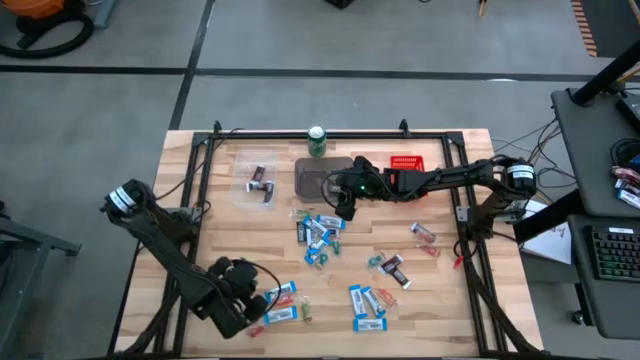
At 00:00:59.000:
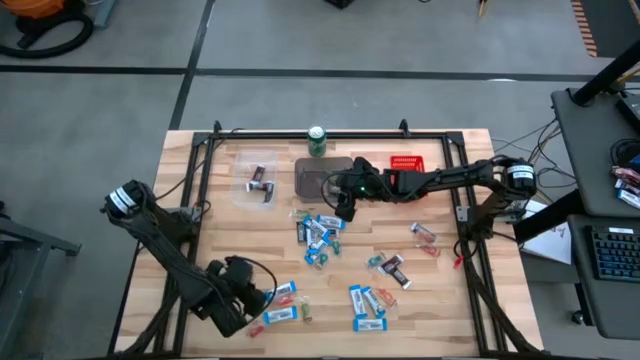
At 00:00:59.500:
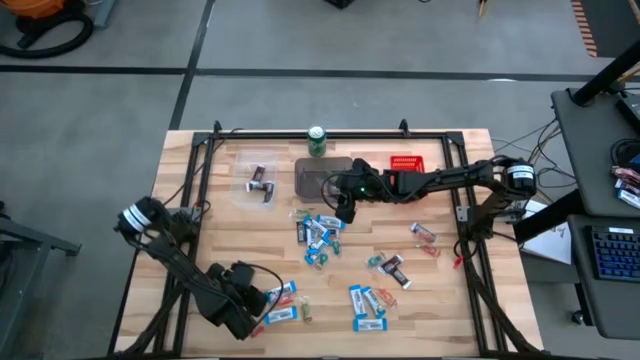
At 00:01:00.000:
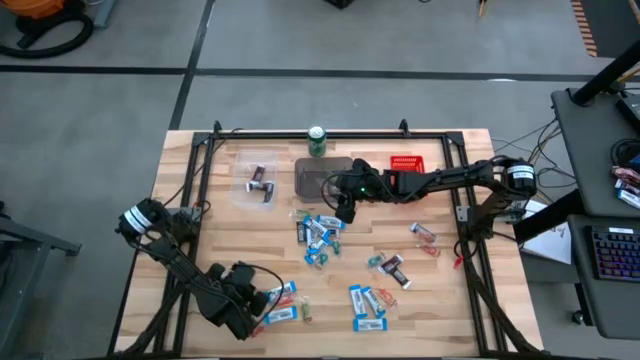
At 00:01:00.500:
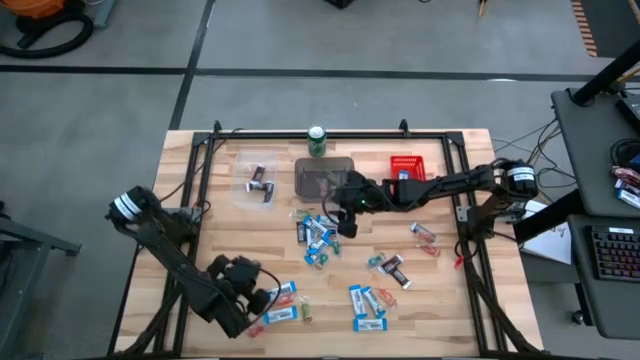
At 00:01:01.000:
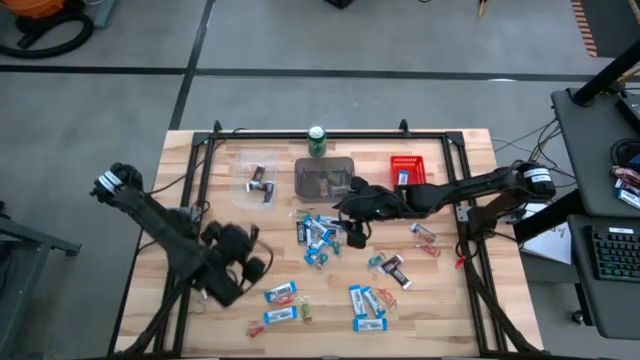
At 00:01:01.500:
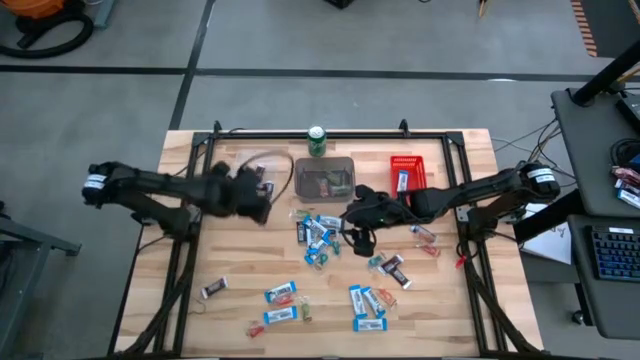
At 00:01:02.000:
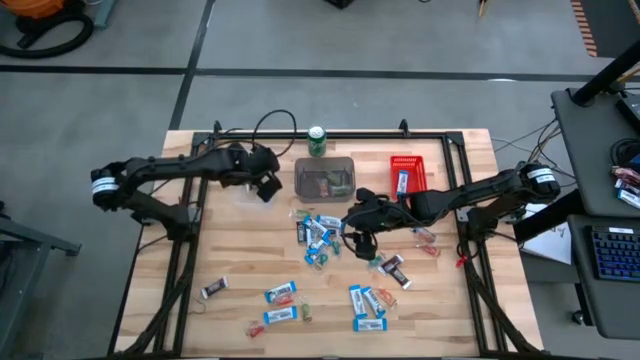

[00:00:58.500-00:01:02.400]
Task: Organize candy in baskets
Put the brown chocolate bar into the transparent bin

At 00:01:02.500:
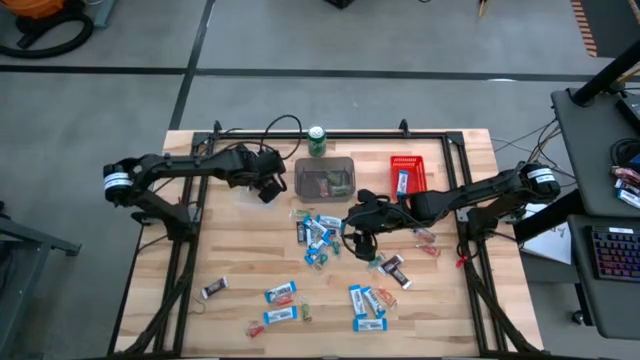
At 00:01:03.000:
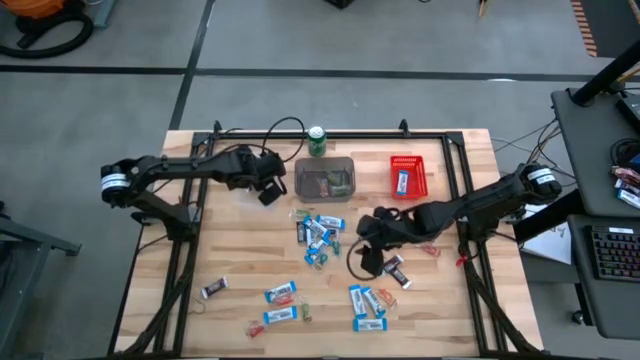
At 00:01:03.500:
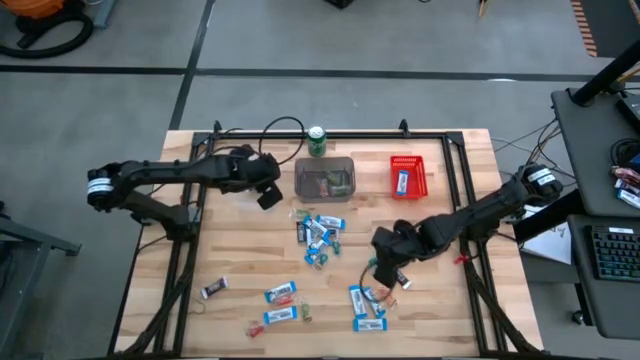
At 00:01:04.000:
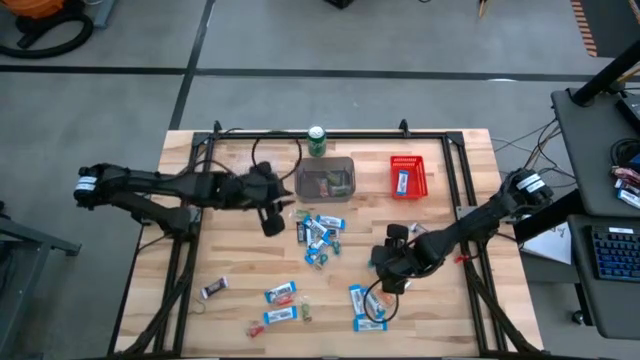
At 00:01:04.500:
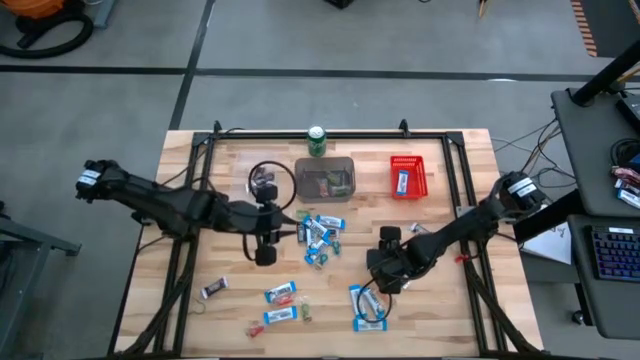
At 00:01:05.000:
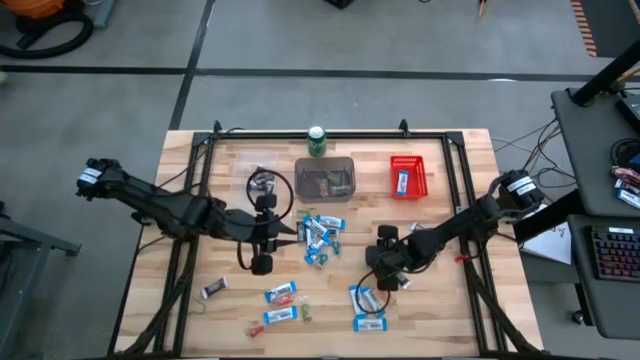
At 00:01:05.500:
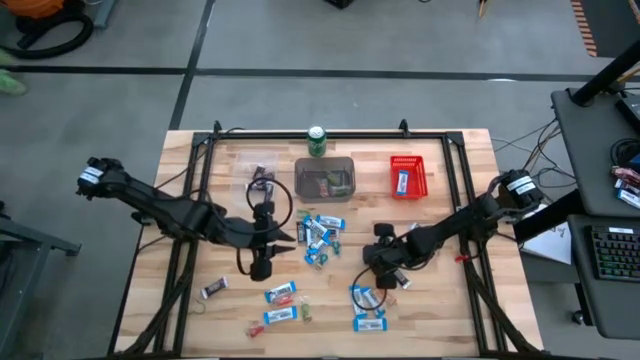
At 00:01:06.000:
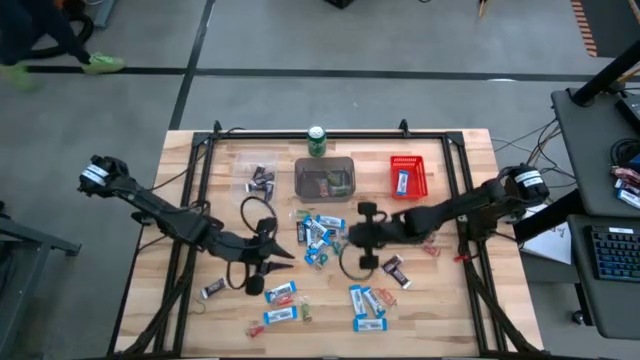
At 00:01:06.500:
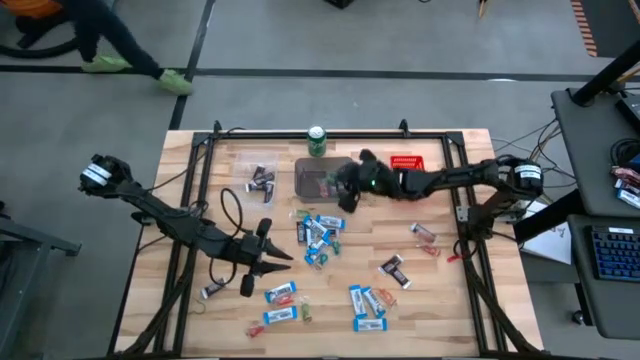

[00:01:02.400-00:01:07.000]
Put the dark blue gummy into the black bin

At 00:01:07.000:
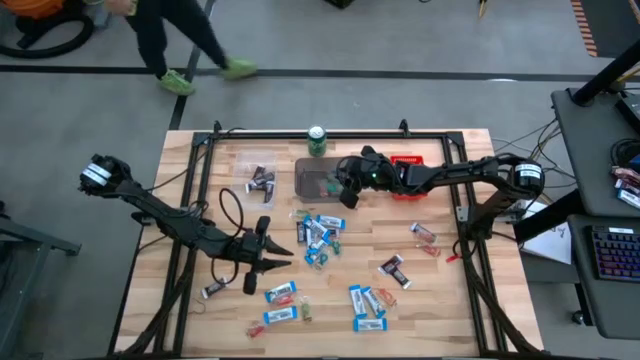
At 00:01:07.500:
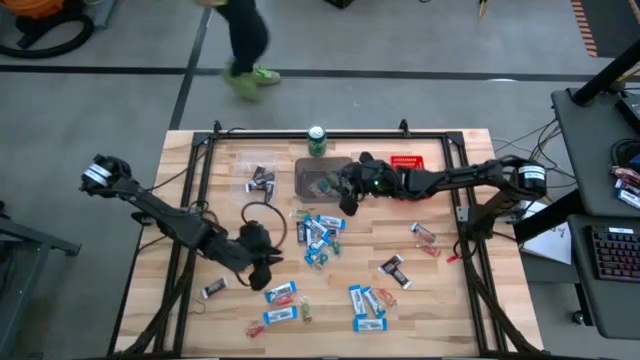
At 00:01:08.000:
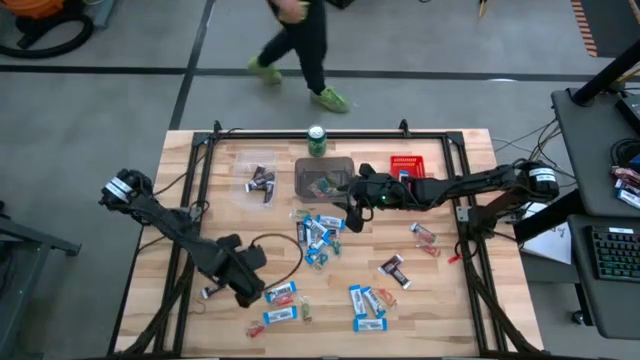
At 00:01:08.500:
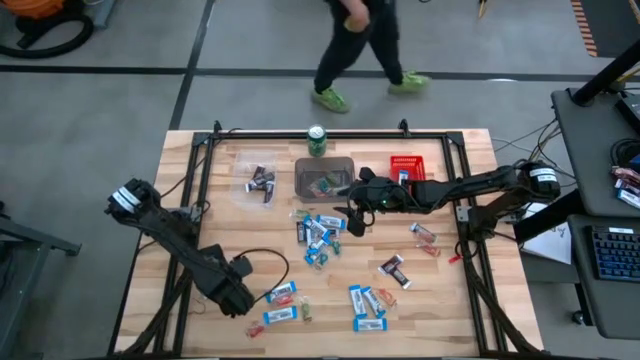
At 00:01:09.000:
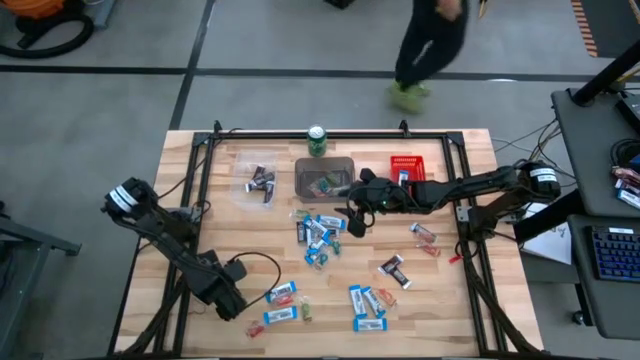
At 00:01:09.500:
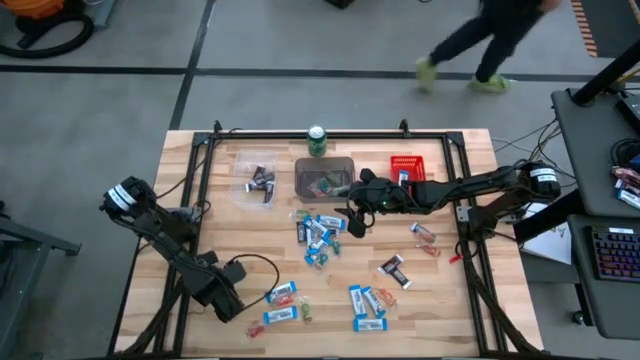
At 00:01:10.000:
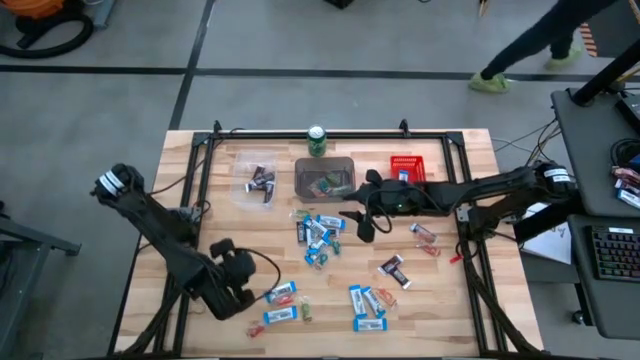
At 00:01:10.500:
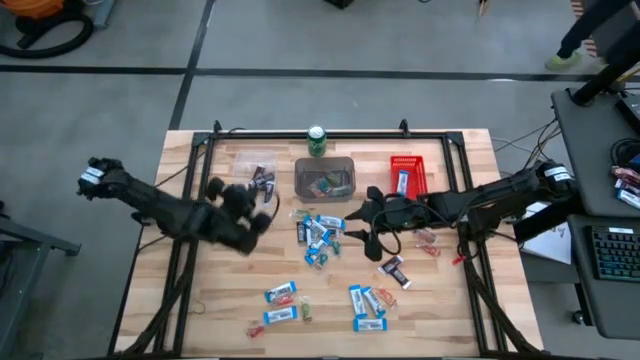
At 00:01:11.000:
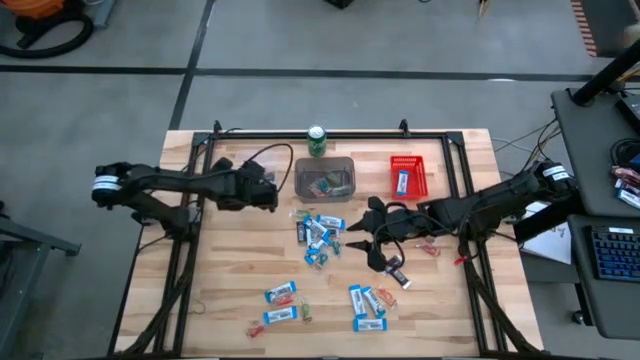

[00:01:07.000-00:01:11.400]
Put the brown chocolate bar into the transparent bin

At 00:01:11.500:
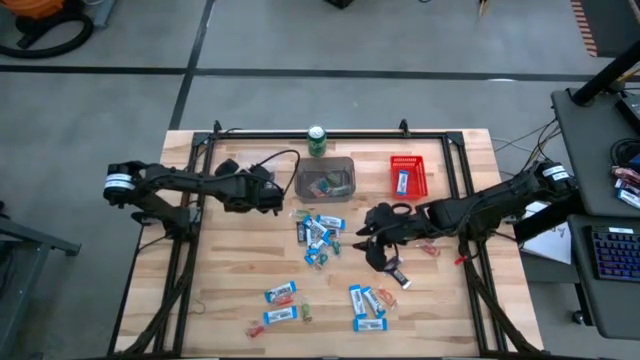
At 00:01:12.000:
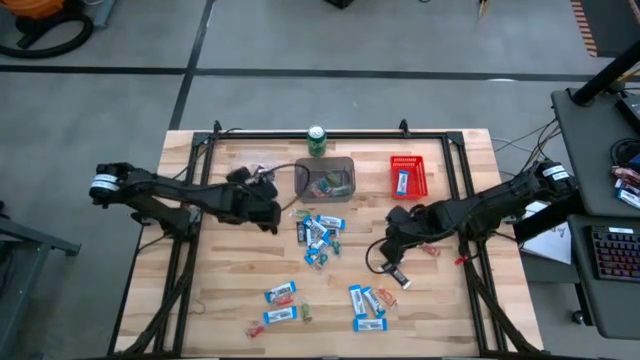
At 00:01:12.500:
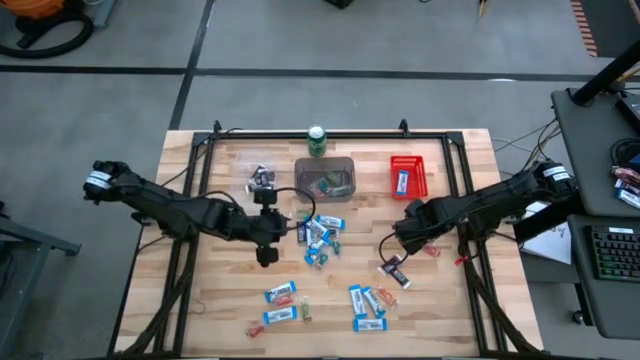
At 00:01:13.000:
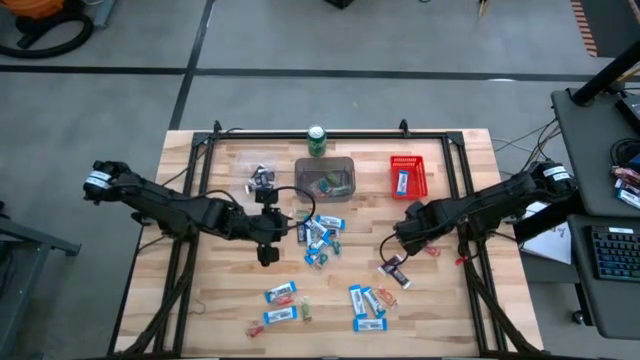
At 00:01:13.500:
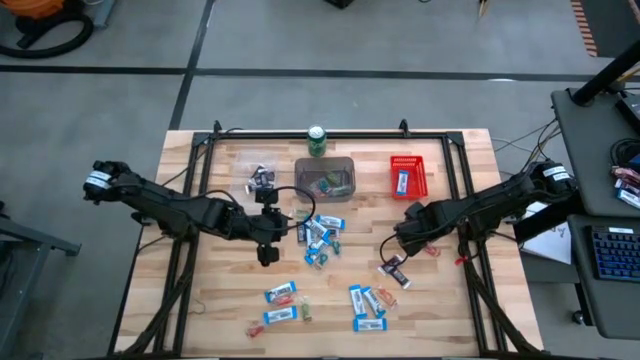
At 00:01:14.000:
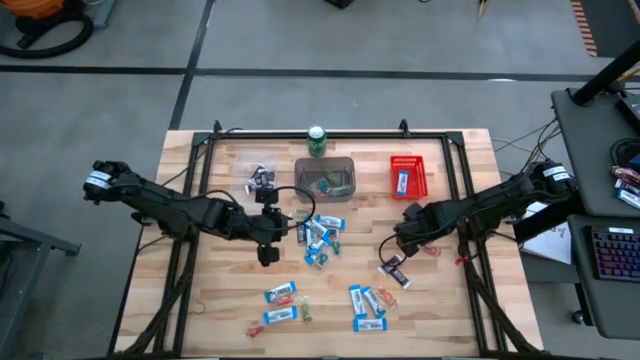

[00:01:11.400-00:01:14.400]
Put the orange gummy into the black bin

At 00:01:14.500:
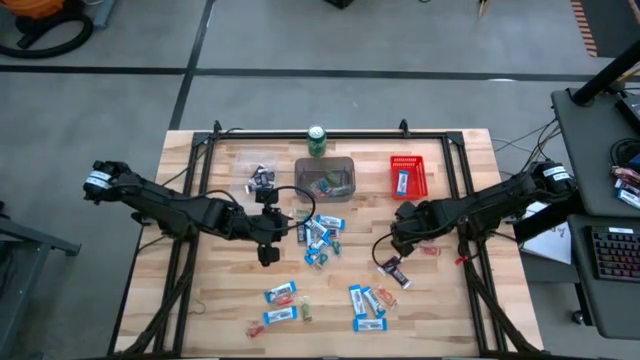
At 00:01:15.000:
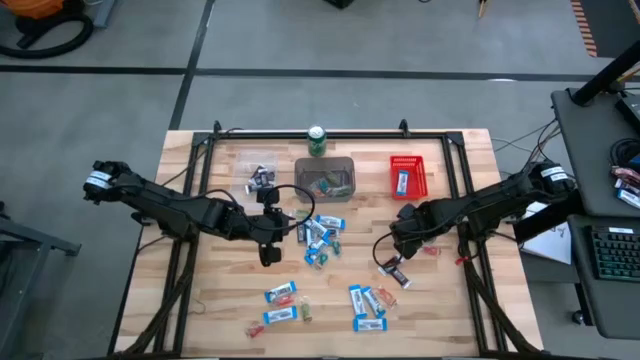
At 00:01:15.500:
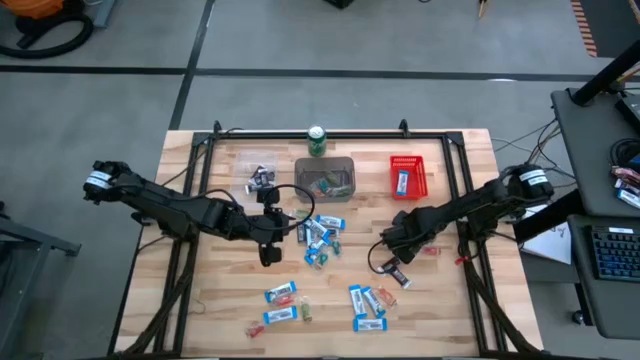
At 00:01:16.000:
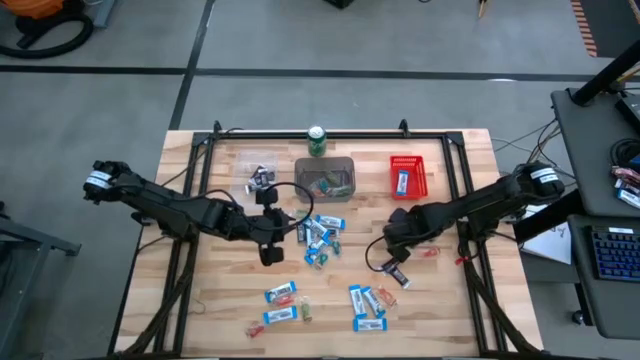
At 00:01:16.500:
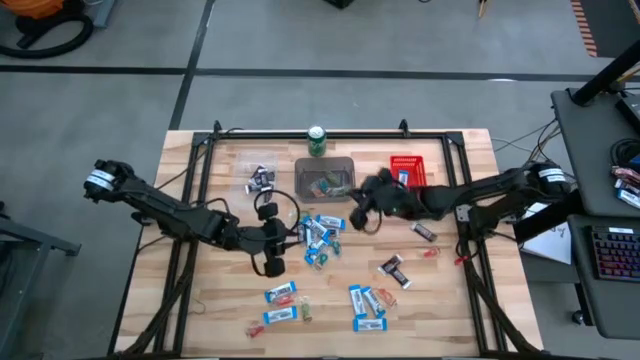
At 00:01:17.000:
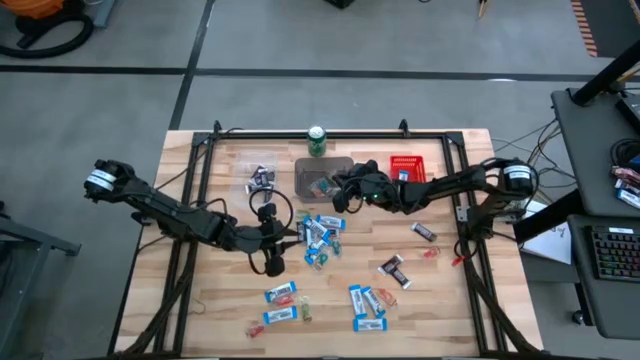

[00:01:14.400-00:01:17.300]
Put the orange gummy into the black bin

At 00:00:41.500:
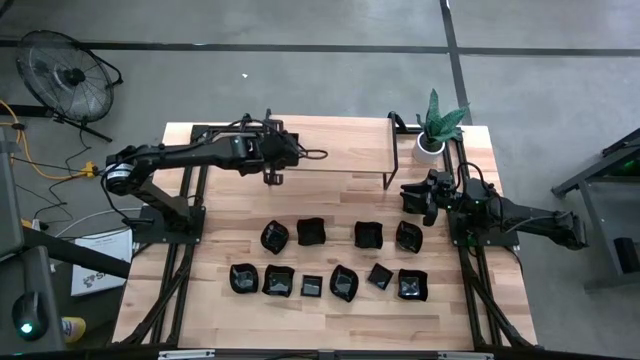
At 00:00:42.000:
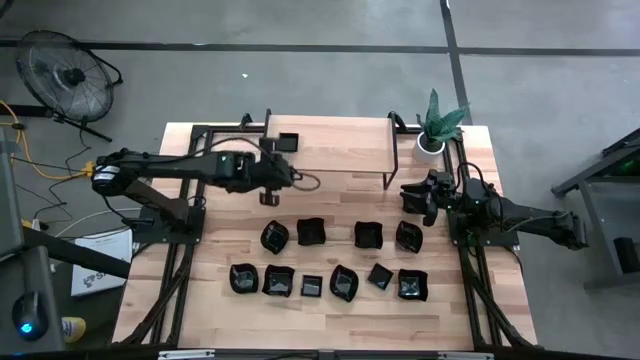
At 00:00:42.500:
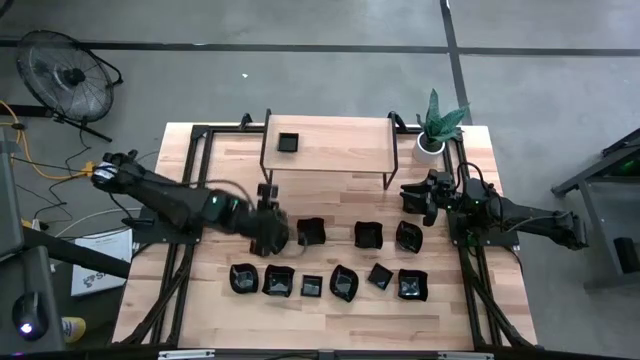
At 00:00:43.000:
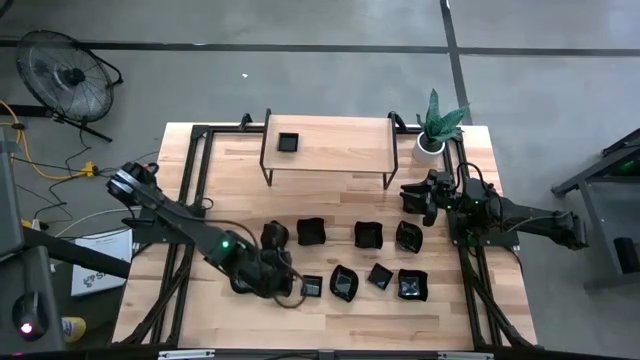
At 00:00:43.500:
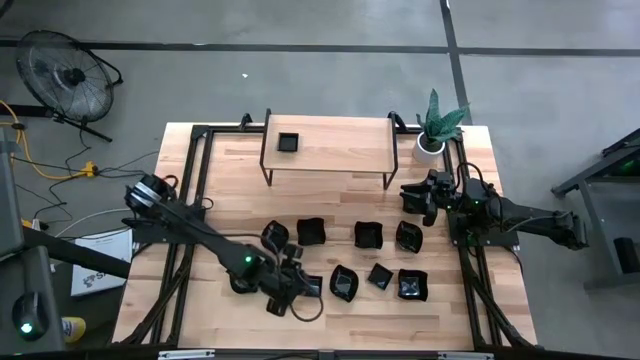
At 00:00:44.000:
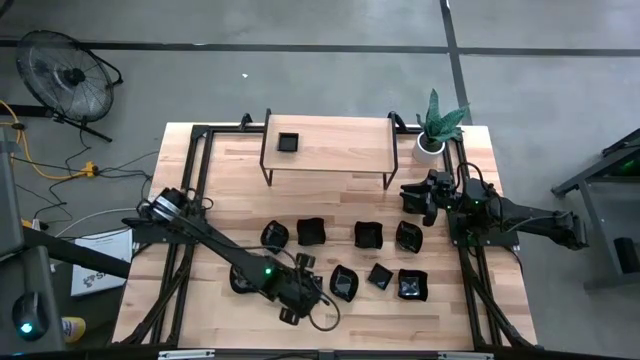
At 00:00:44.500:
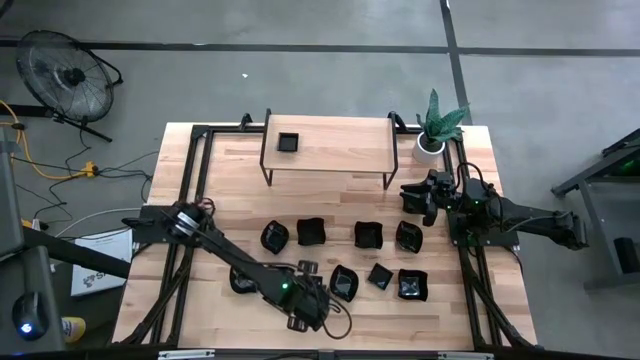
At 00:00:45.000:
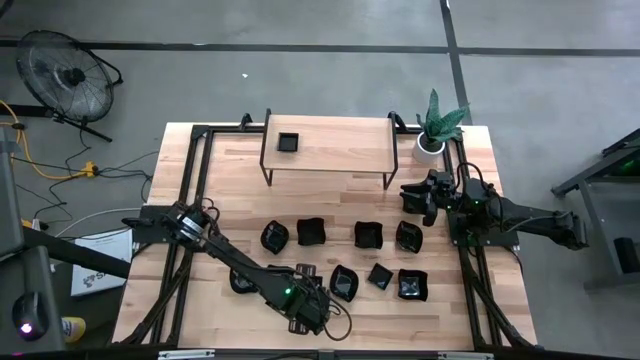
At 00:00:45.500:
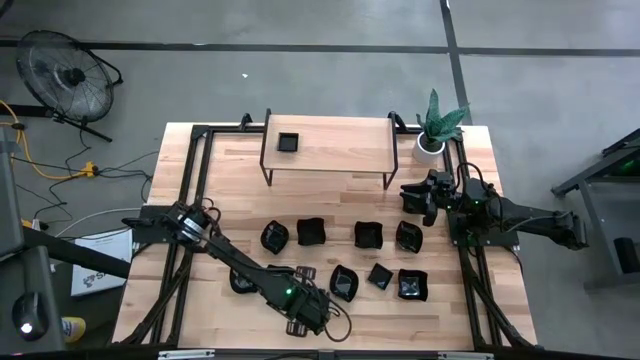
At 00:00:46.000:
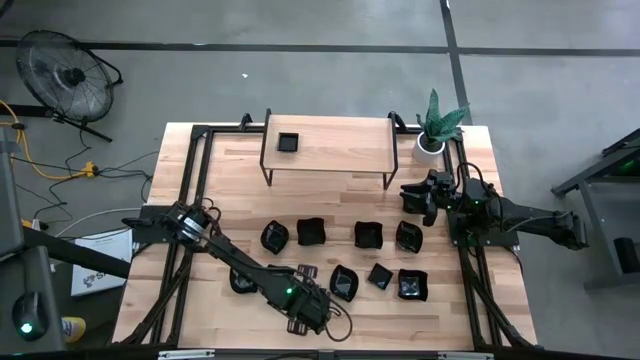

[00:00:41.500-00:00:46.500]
Task: Pick & Place Mini shaped plates
Stack the black square plate on top of the stacked black square plates on the shelf
